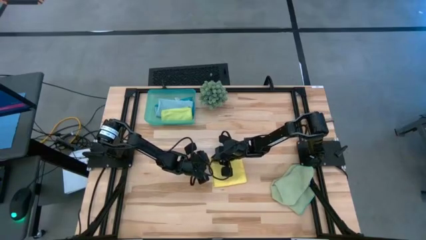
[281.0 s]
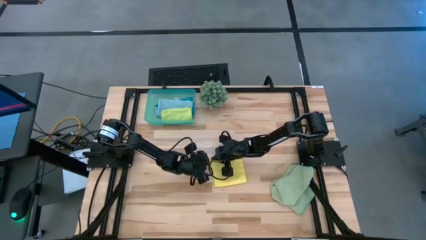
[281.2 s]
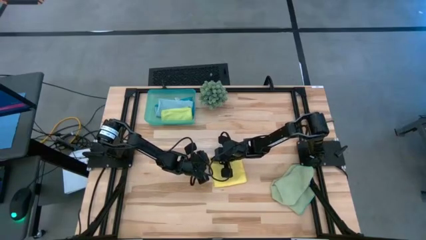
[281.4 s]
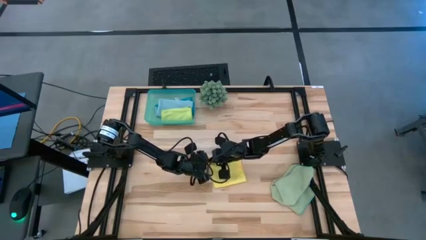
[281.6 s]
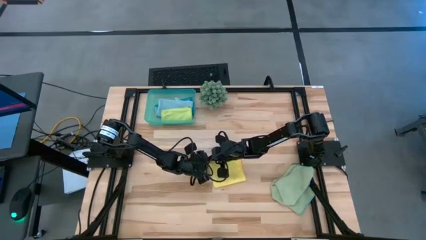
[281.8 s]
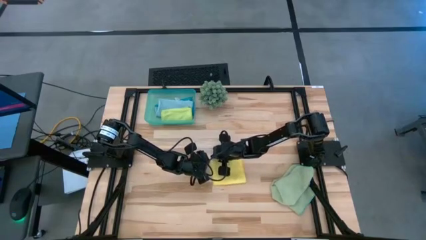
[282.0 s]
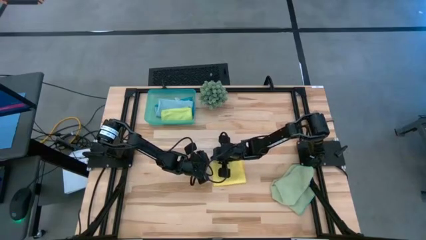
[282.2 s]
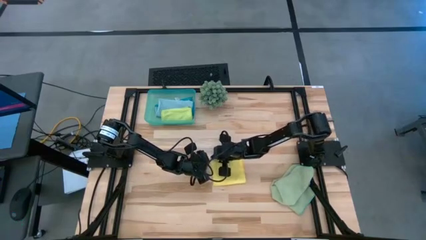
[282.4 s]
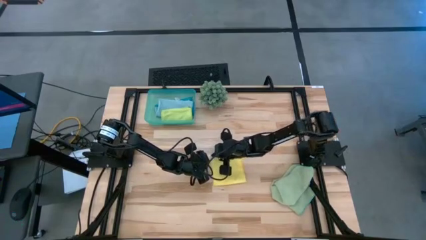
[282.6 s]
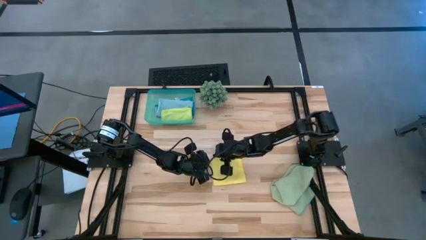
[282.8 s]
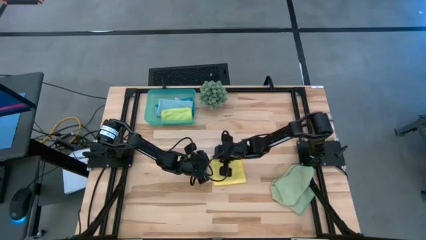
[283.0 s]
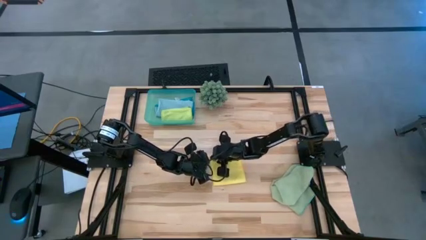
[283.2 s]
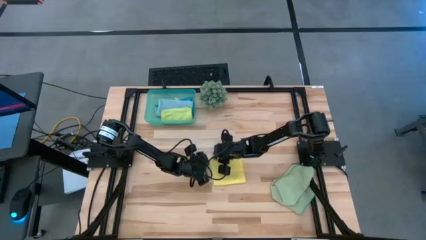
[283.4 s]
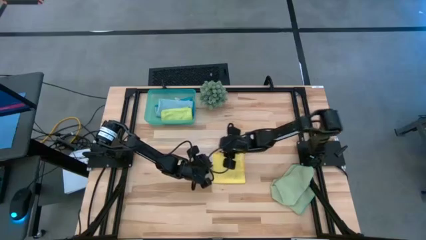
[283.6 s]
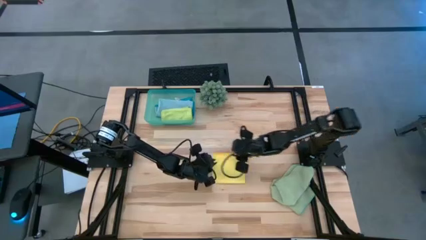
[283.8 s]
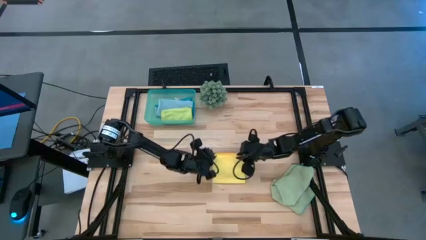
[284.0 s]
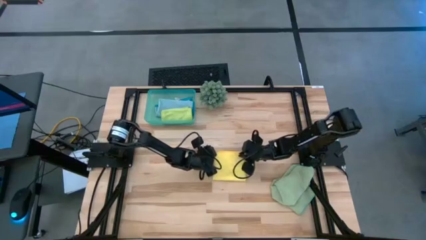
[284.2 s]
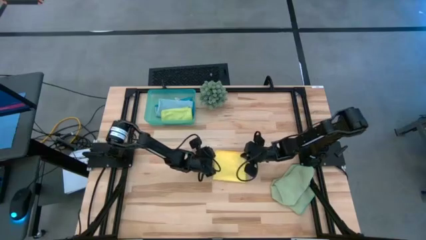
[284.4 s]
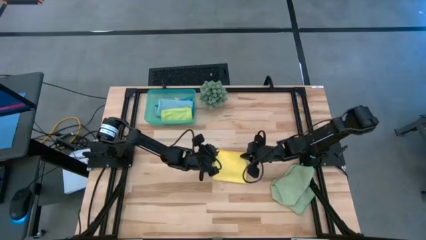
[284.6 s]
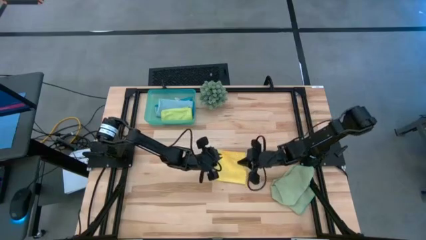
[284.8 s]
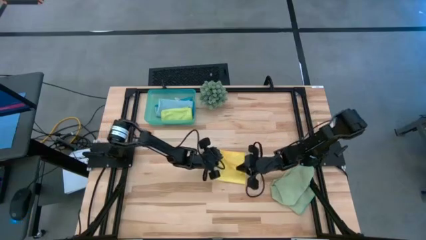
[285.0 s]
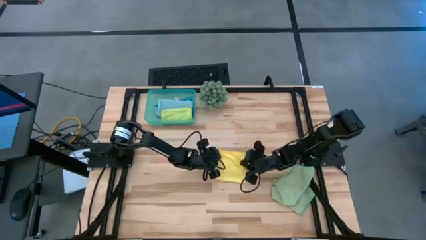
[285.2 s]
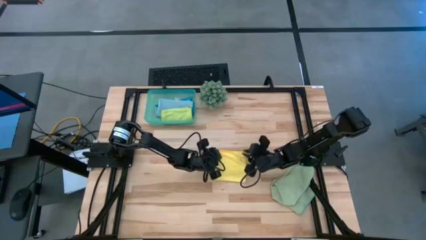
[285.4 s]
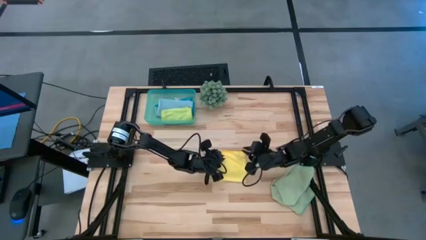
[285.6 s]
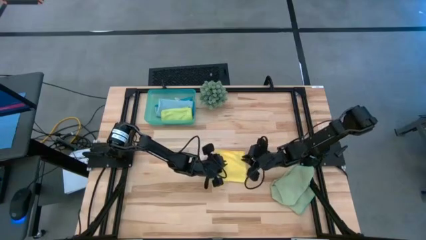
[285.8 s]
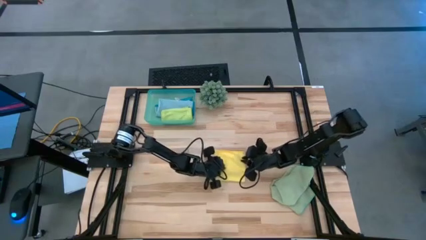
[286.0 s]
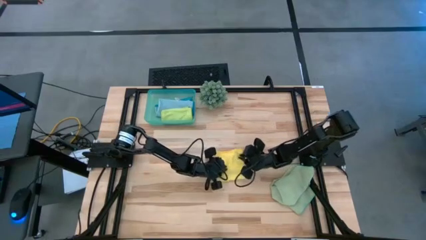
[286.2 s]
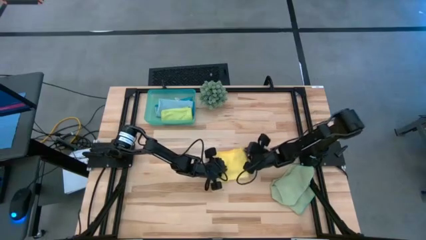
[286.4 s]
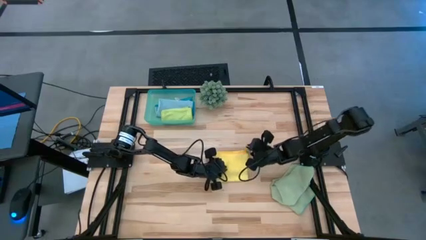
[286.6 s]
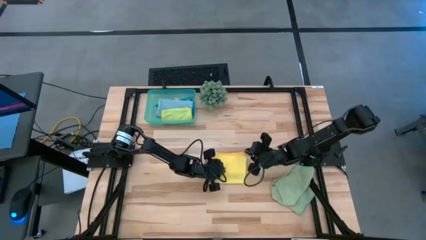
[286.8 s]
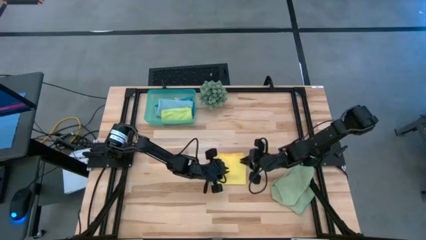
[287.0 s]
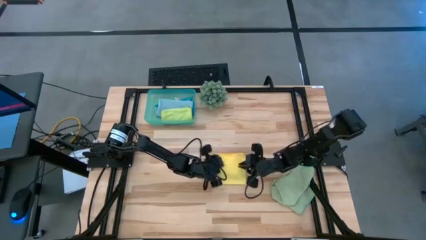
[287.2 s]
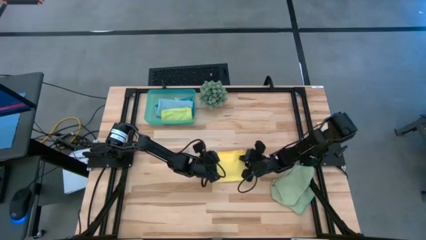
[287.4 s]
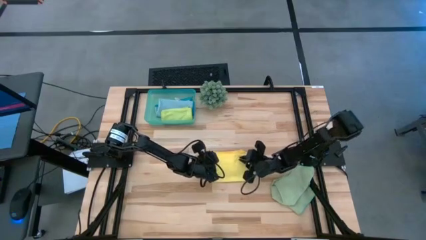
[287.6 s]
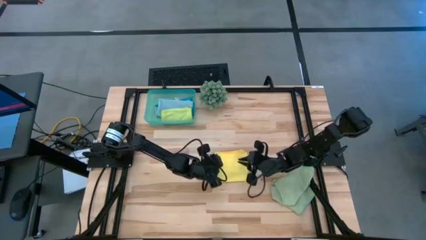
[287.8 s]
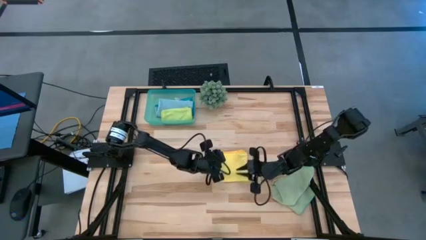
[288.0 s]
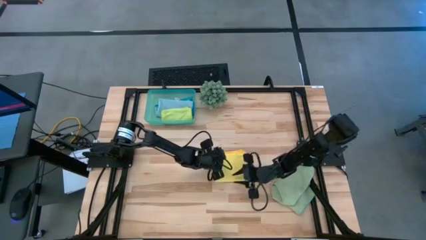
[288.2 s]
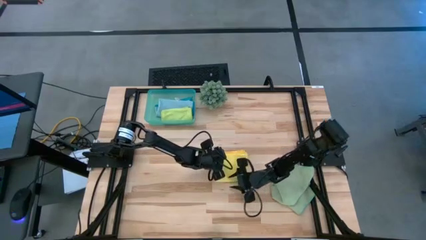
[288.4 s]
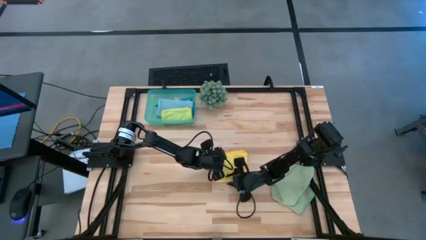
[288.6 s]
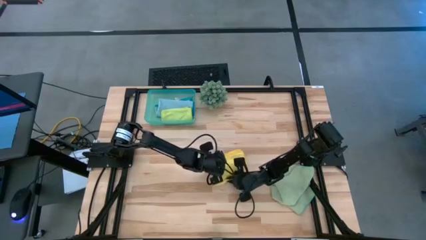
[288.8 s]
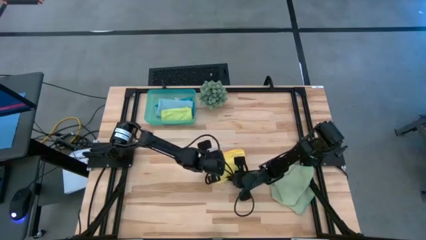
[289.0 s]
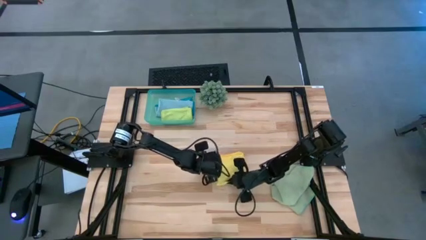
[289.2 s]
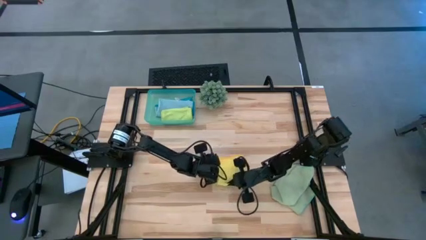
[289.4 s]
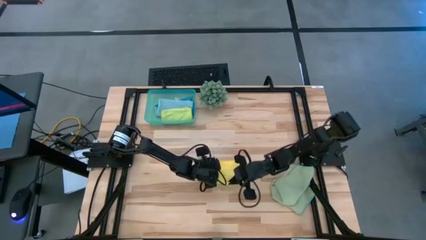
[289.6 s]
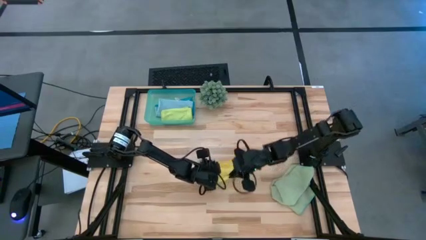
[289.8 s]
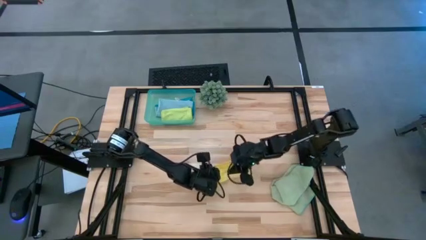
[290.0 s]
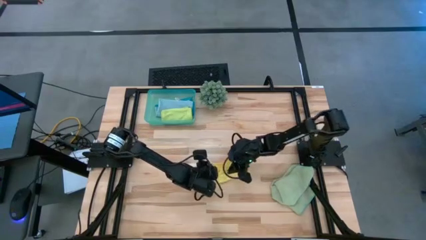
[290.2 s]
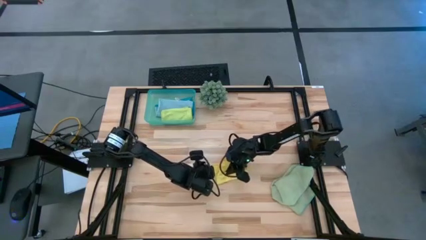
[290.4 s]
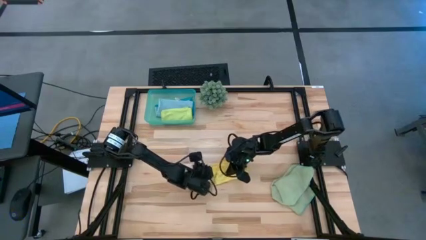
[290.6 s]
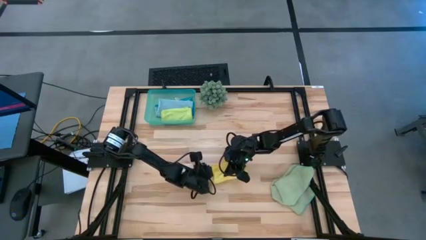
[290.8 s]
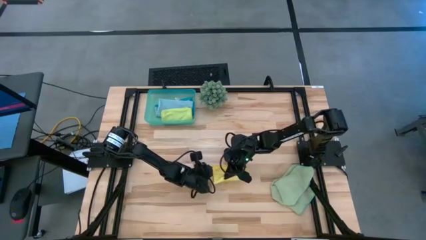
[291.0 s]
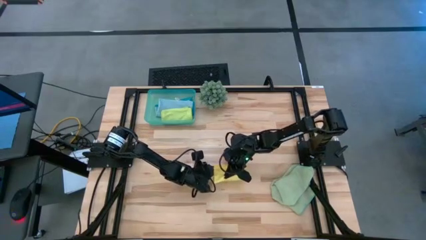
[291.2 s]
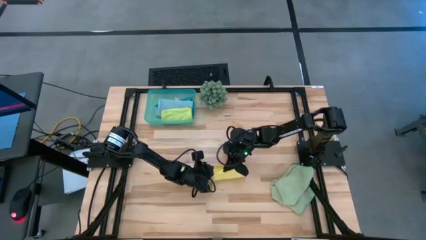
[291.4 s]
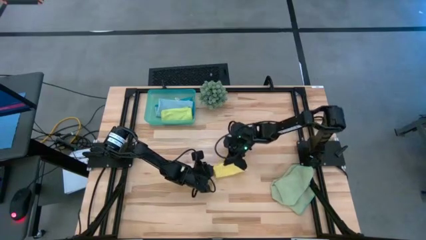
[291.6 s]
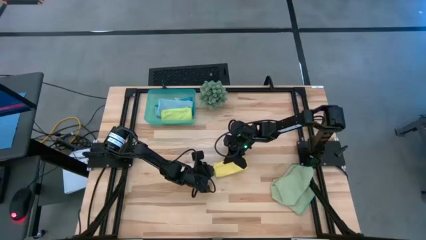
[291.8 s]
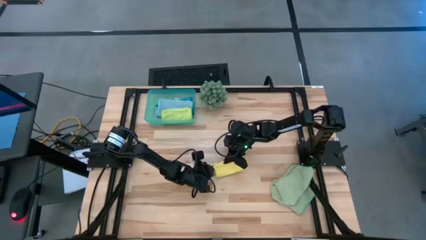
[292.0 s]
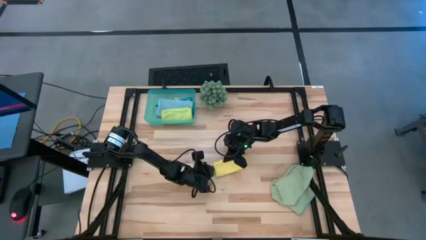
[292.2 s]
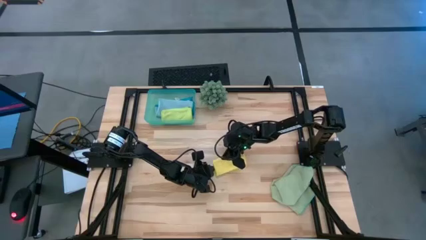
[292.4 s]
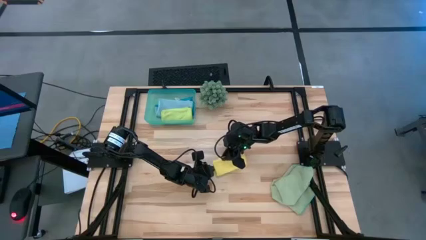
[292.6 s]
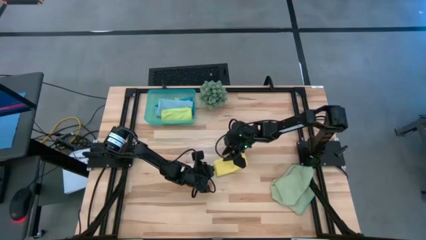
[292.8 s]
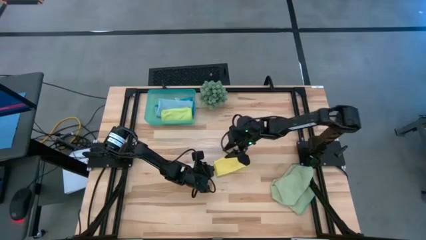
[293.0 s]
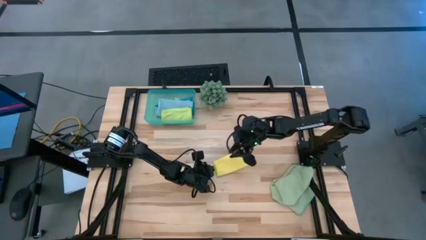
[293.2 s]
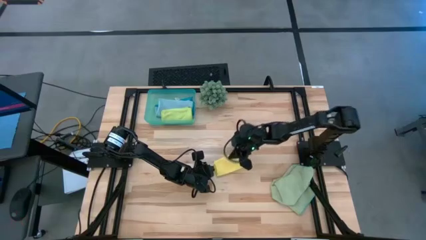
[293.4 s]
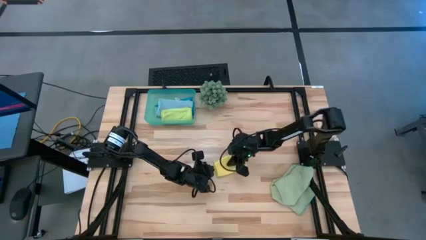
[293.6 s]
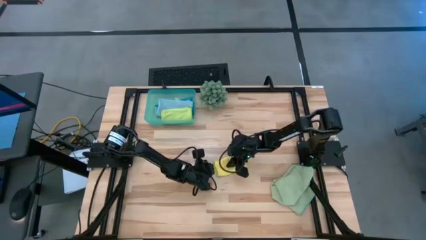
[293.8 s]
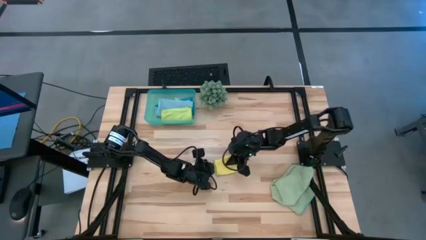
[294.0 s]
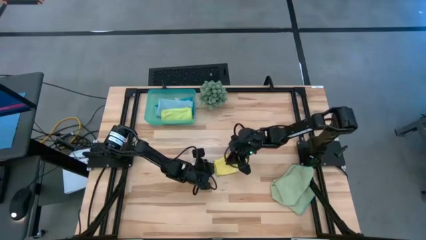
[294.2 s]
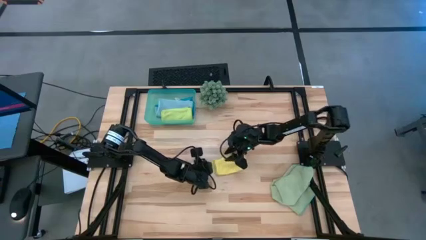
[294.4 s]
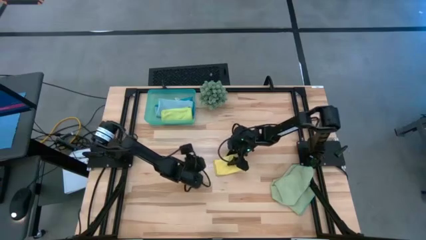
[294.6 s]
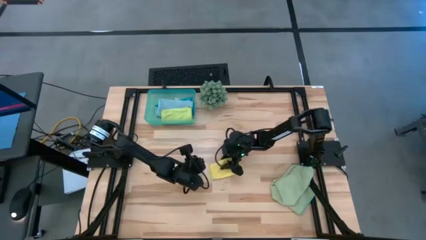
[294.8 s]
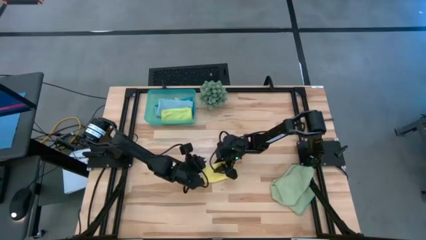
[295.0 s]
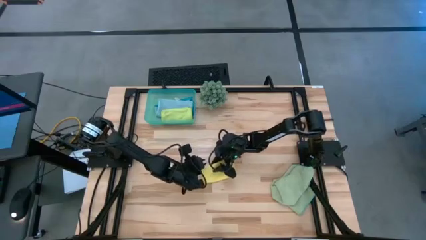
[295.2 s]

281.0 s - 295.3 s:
Task: Fold microfiber towels
Fold the yellow microfiber cloth

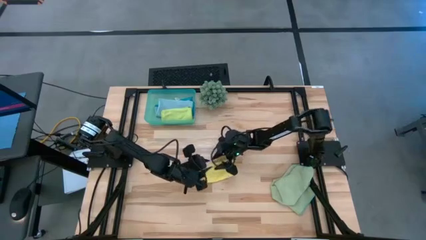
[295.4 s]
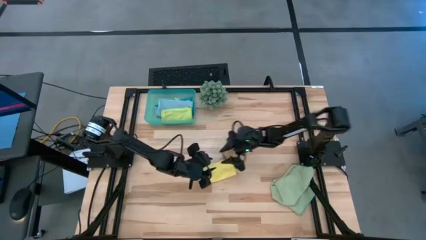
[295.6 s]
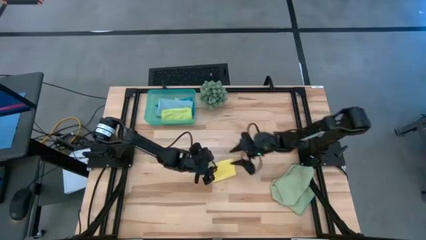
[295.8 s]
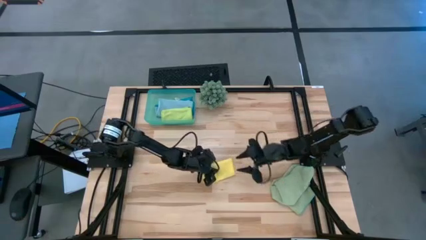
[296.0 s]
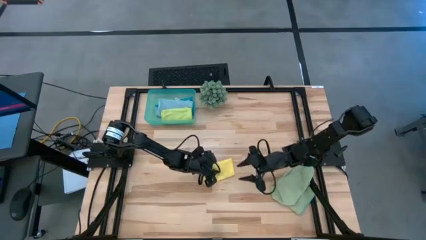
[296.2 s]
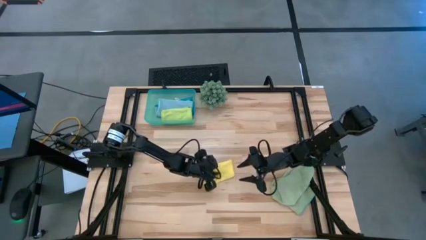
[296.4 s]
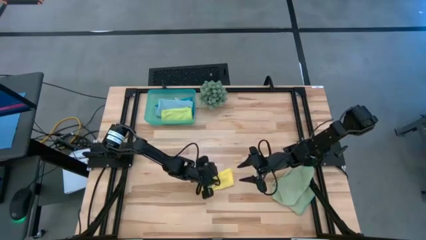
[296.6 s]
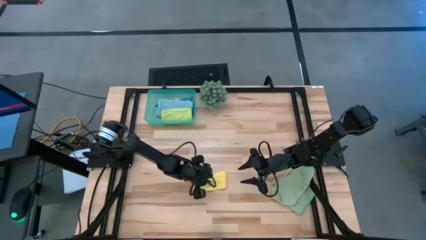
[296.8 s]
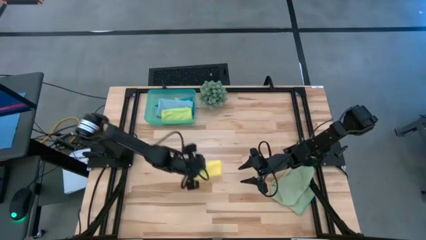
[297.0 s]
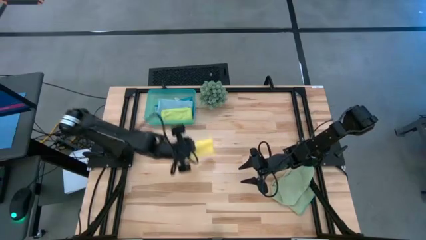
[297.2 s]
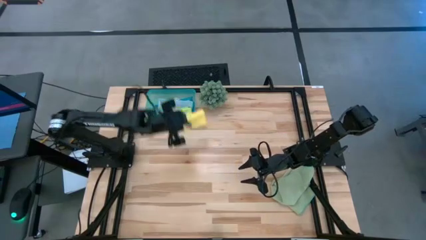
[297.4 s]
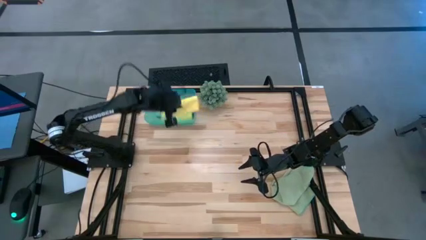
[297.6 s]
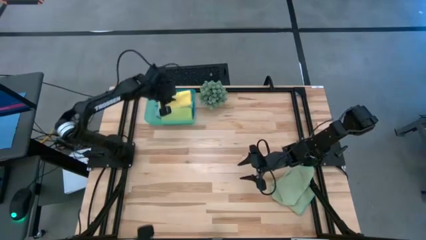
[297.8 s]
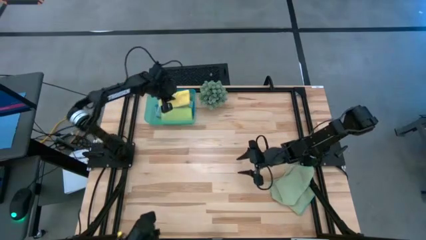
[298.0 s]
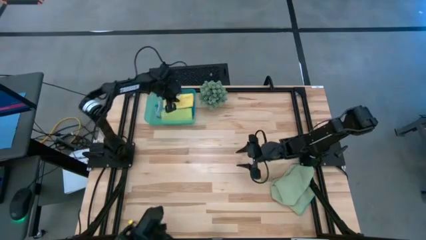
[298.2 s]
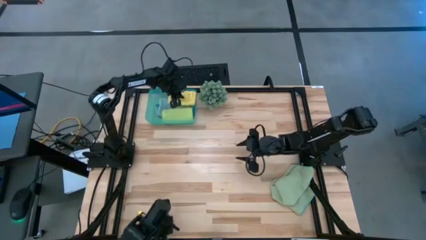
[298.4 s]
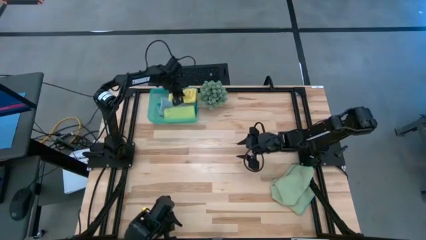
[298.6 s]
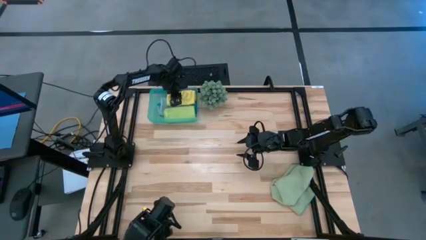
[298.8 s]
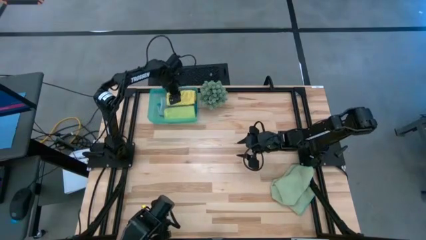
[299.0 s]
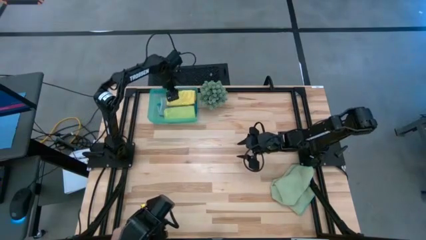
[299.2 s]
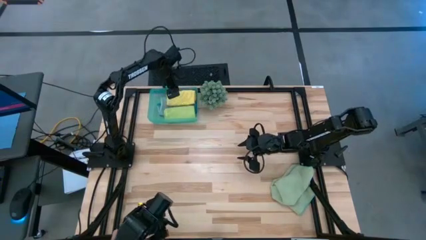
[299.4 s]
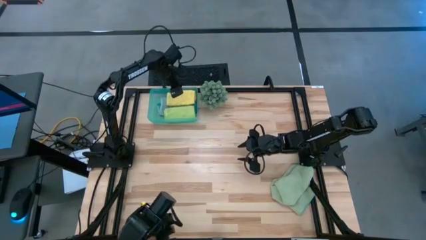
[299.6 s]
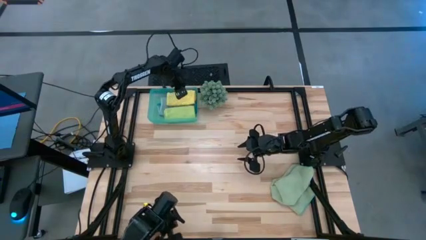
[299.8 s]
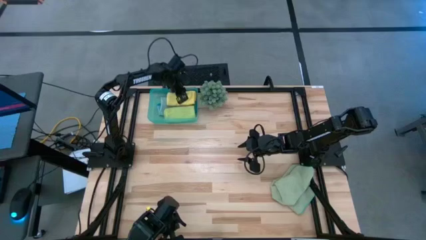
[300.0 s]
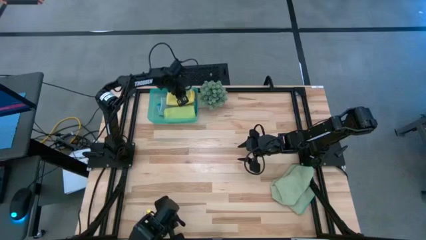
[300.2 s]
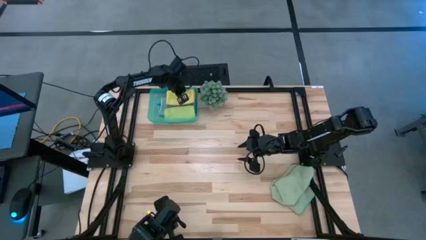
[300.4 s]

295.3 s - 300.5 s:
Put the folded yellow microfiber cloth into the blue bin
